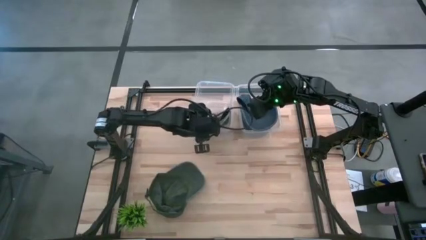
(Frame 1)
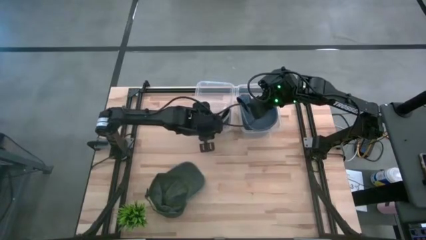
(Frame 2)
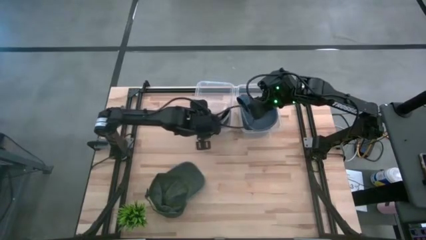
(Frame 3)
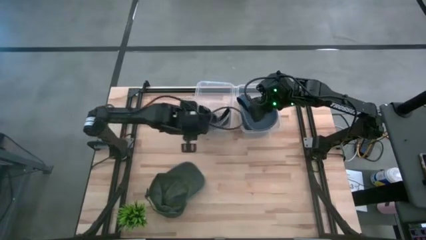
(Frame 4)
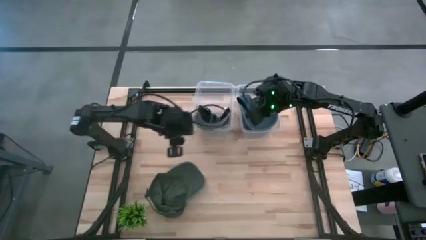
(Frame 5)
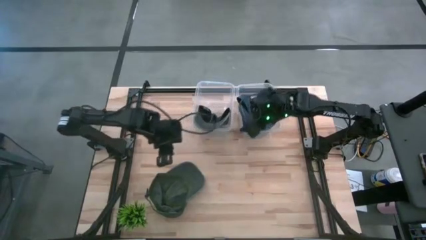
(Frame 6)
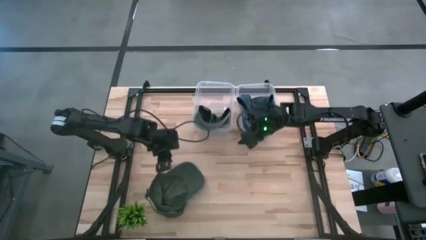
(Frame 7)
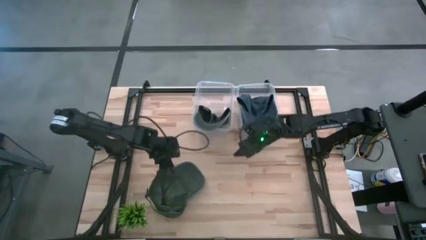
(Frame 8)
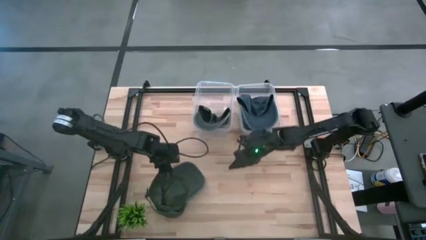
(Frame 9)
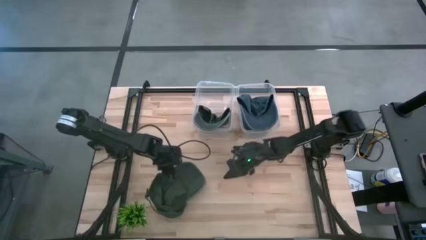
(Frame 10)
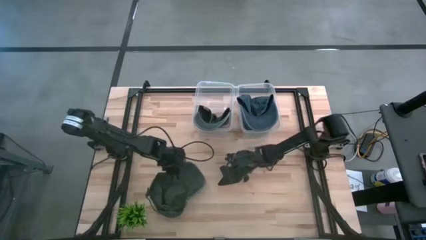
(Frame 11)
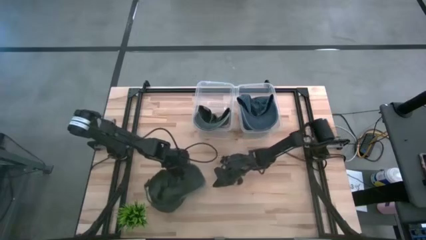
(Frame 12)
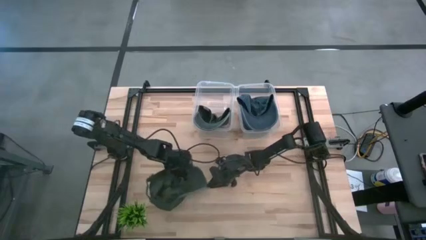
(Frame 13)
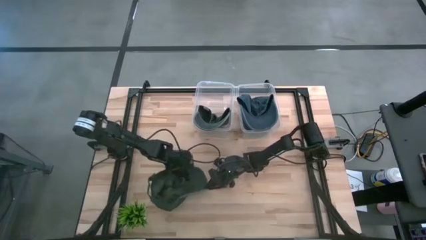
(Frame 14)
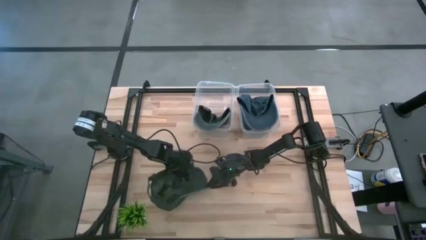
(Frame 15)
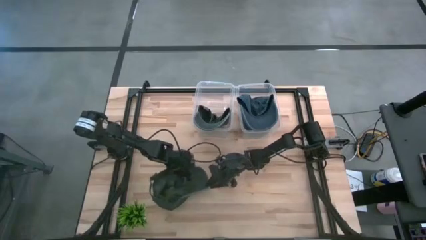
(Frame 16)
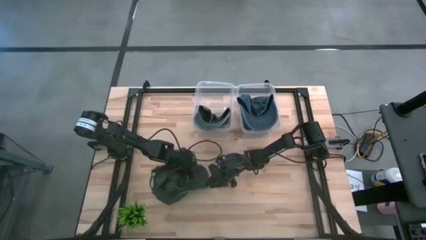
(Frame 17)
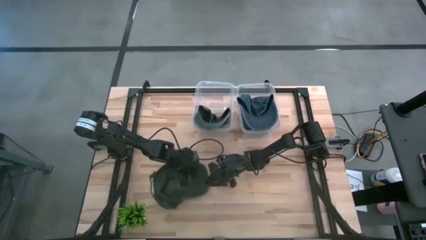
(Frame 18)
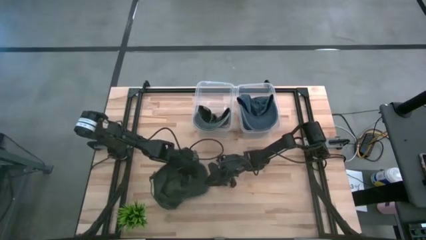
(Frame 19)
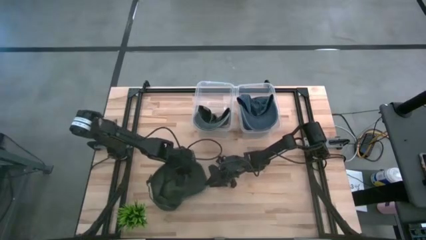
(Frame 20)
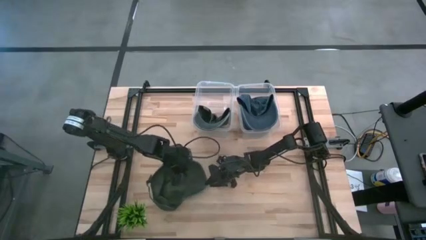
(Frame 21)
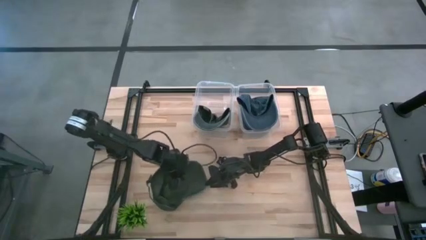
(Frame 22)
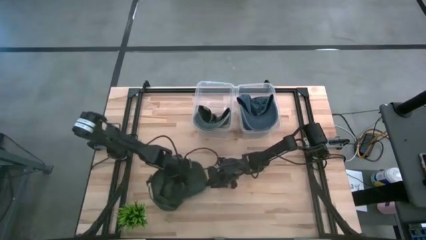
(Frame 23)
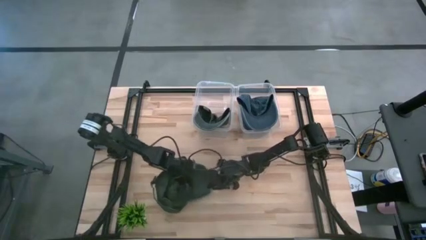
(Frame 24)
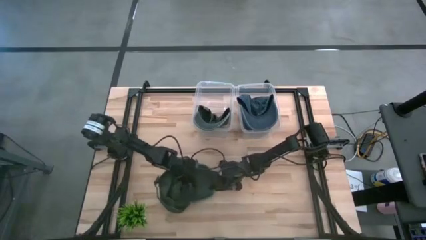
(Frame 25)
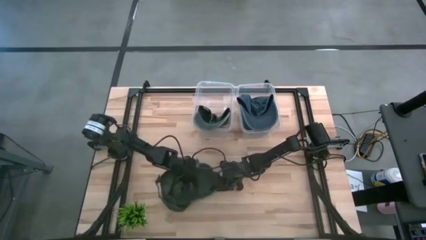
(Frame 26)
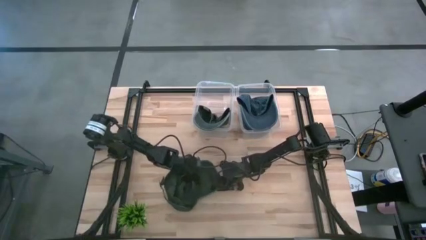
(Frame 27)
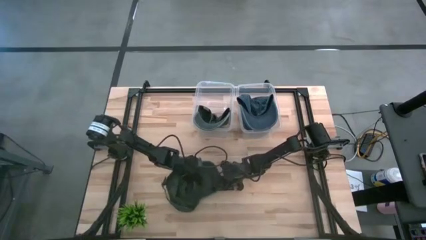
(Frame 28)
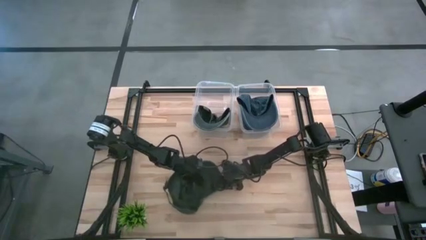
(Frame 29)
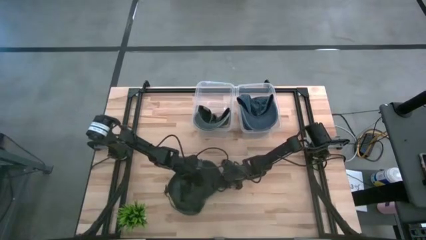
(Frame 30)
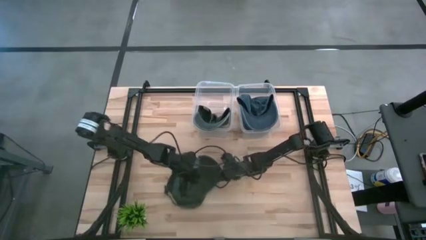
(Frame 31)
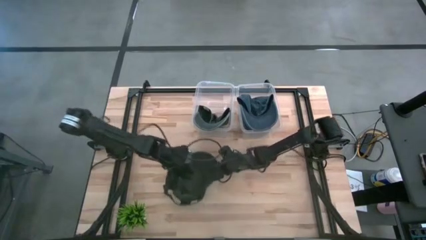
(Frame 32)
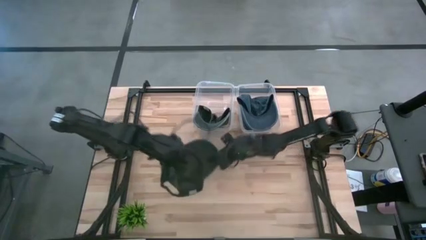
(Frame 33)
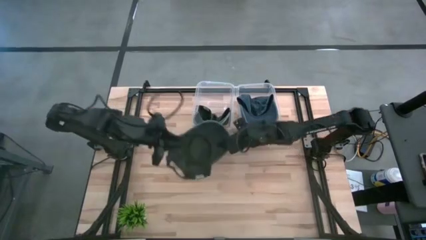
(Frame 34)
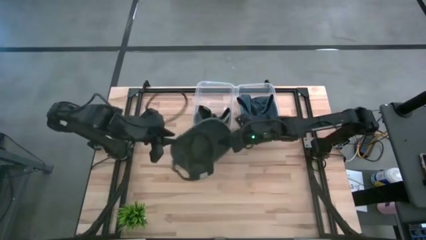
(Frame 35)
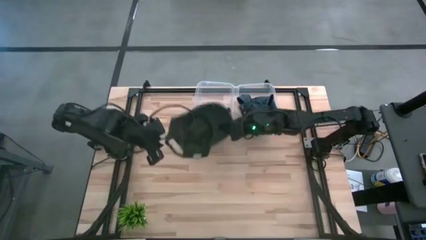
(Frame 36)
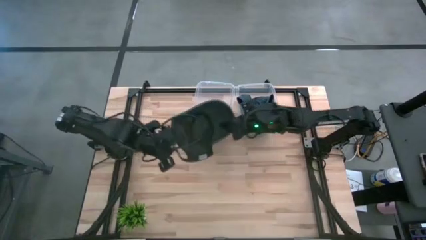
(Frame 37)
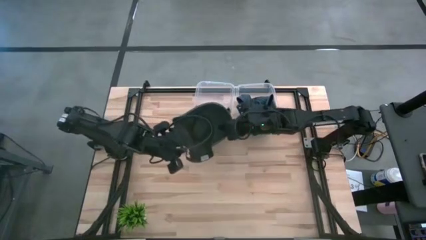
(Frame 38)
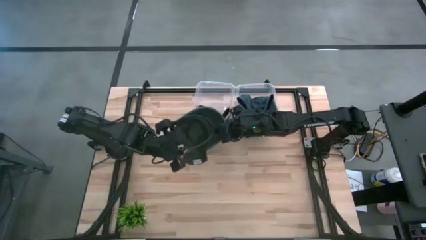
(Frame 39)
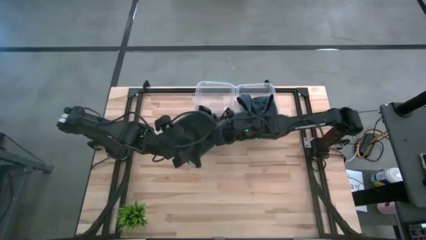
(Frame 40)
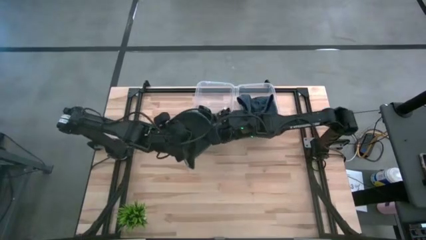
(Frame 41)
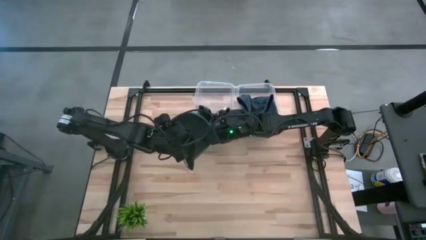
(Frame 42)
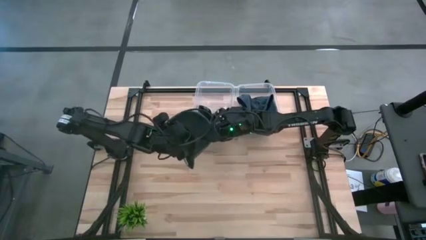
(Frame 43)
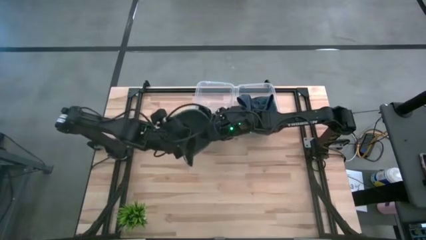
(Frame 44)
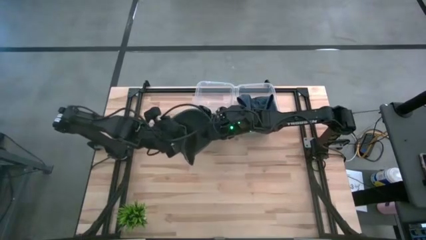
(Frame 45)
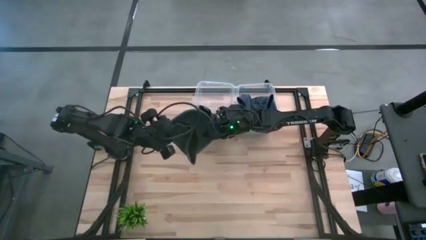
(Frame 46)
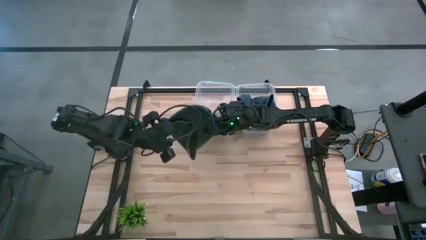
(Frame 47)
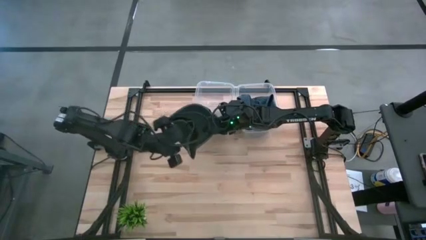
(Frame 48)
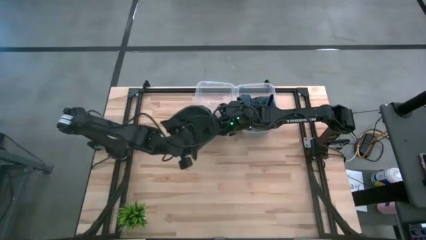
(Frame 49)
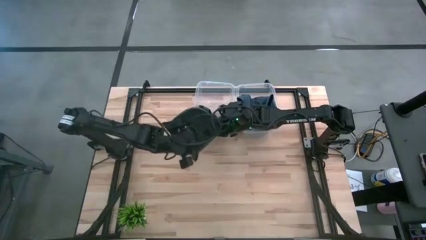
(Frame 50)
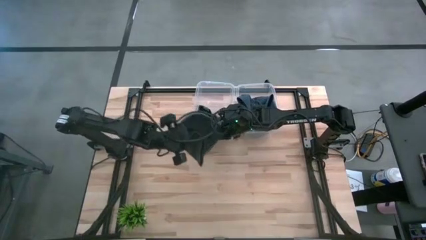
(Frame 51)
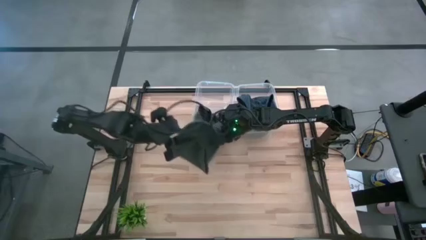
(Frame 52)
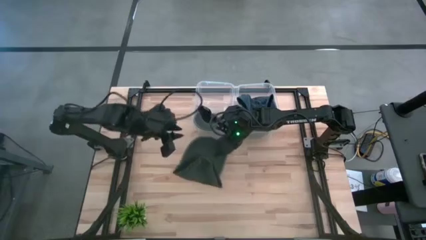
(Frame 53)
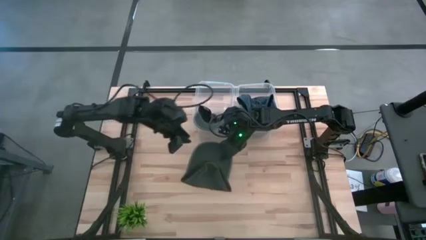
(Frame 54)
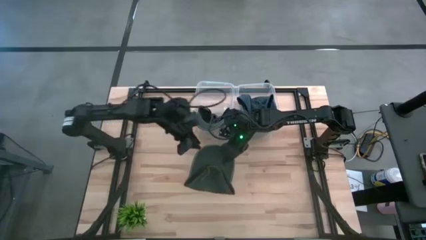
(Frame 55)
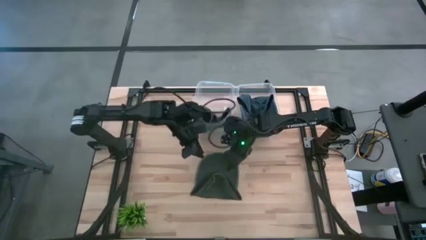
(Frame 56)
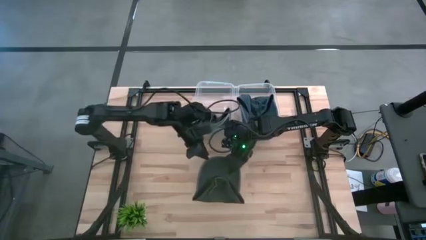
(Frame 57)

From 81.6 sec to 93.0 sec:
Task: Pick & Place hat
Put the gray cap into the left transparent bin

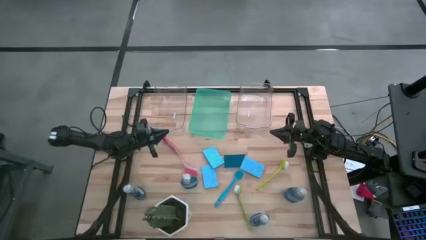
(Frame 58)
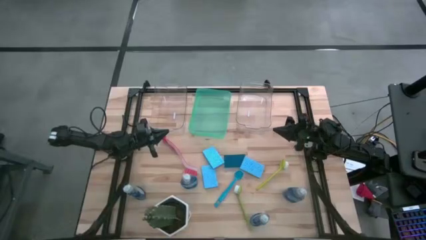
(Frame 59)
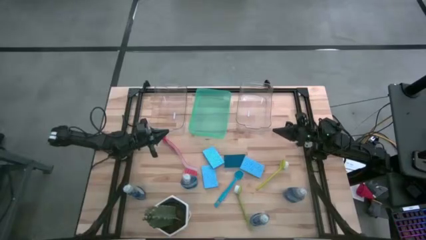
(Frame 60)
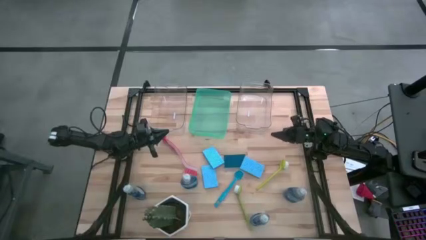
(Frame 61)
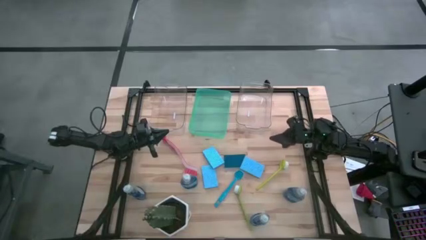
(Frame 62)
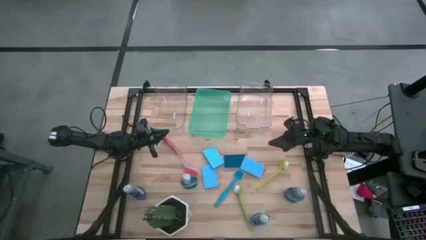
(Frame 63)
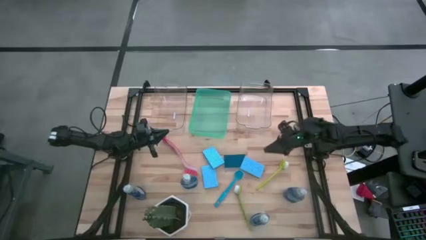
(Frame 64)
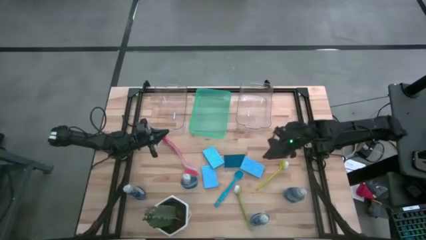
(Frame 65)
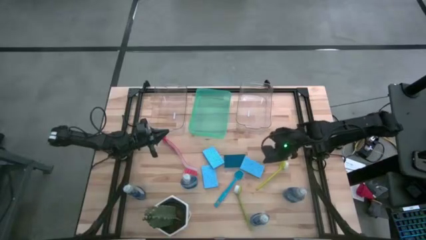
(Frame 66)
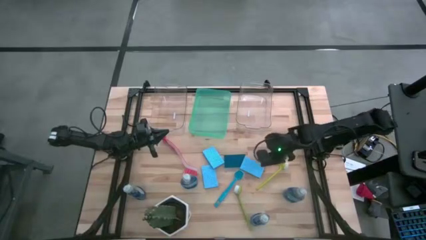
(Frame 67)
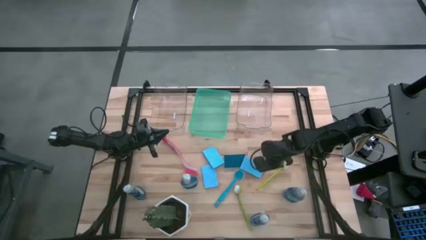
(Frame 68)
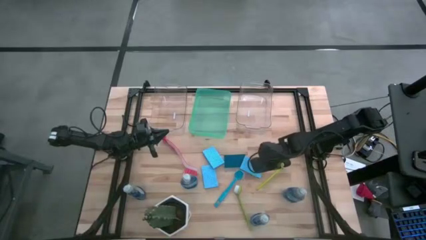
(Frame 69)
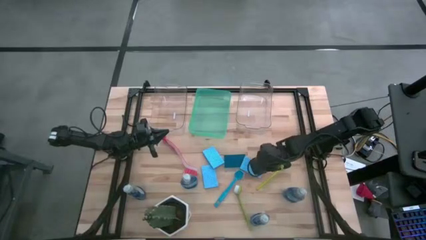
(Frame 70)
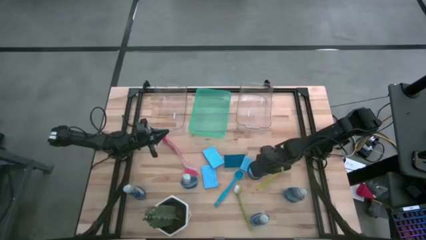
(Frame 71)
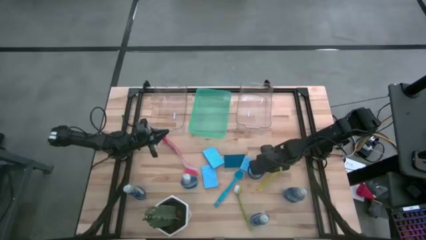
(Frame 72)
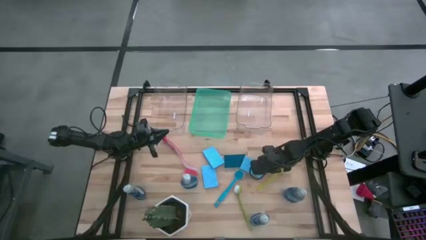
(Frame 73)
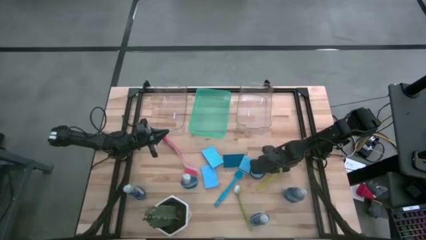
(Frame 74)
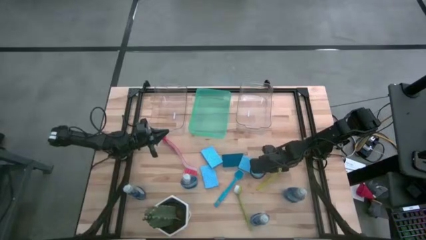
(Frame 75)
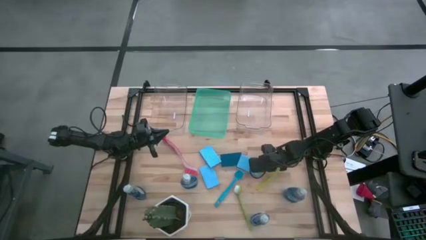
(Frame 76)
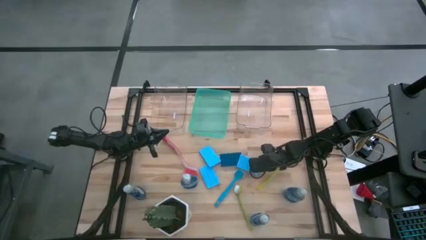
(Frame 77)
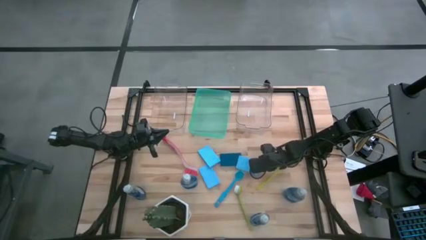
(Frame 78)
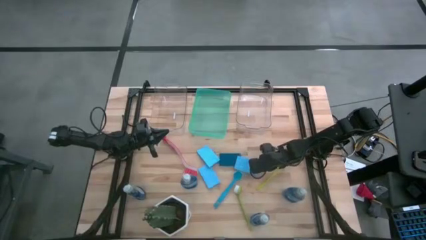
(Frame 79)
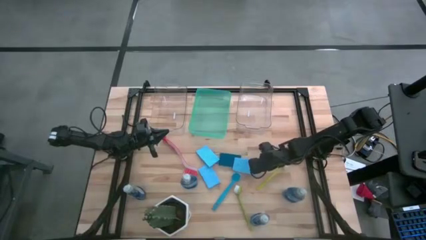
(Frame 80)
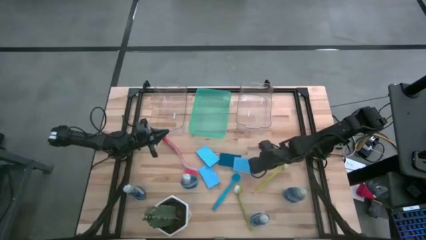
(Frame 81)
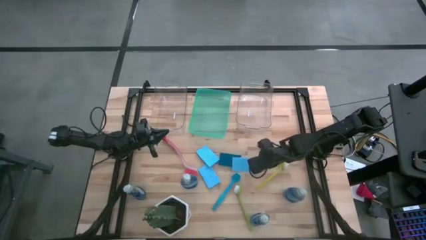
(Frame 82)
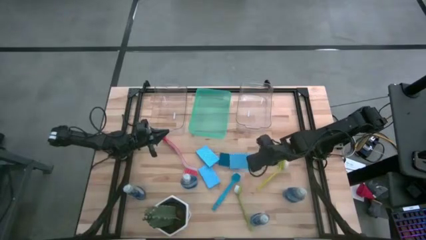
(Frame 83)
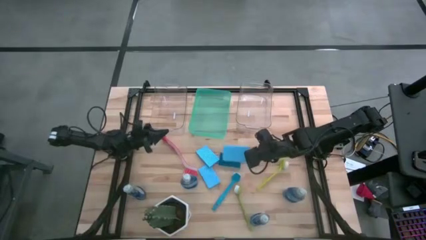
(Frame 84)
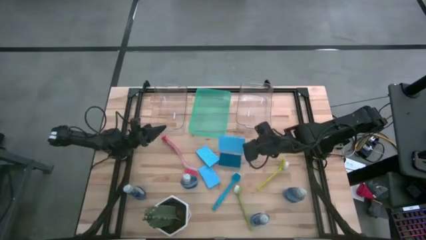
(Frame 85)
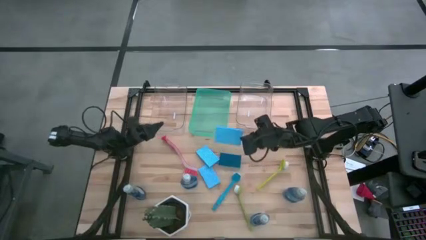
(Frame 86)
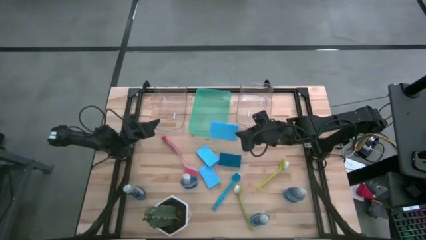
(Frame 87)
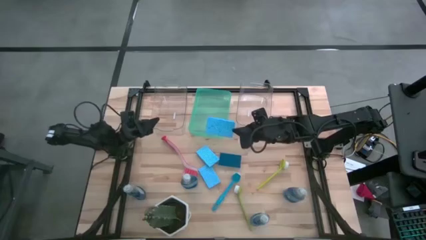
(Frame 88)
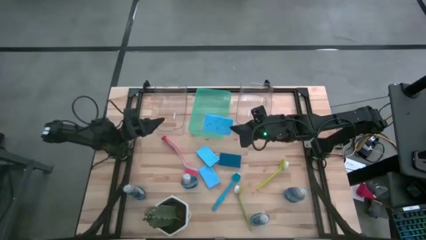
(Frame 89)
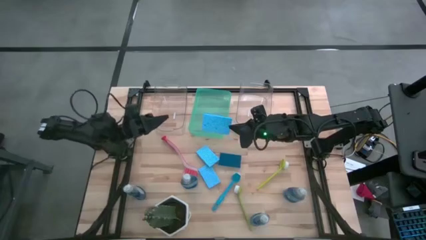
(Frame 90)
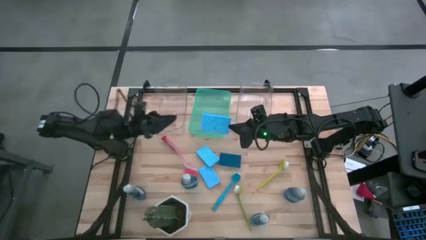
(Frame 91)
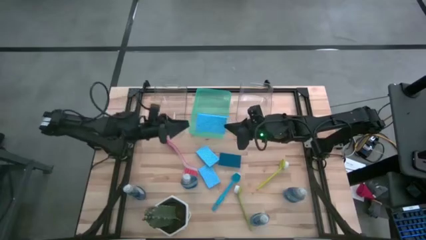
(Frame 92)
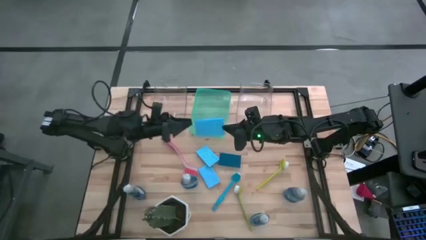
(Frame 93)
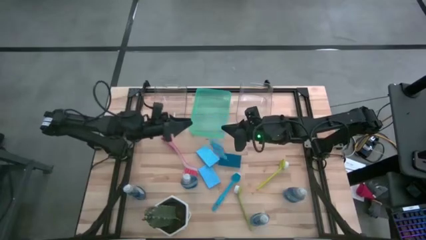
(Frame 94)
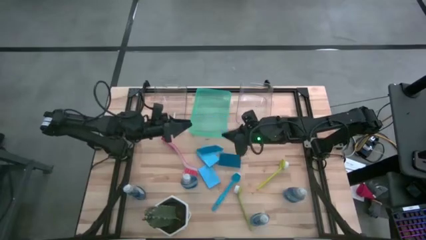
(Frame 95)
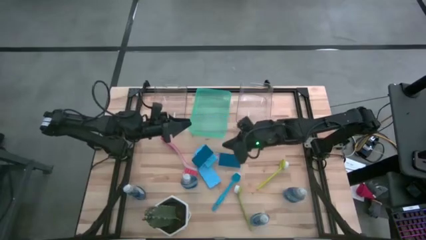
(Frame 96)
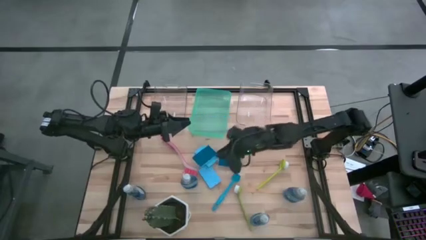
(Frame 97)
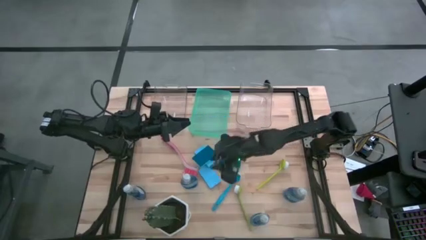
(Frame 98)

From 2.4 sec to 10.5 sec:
Task: Pick & Place Kitchen Sink Supplies
Put the sponge into the green bin
